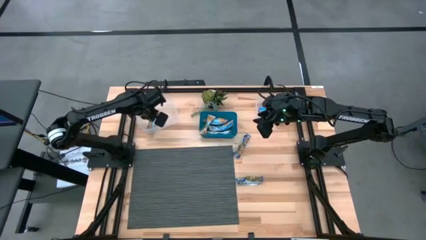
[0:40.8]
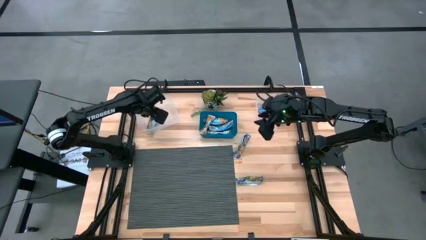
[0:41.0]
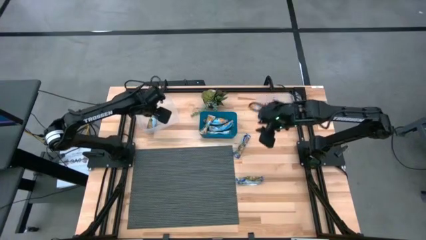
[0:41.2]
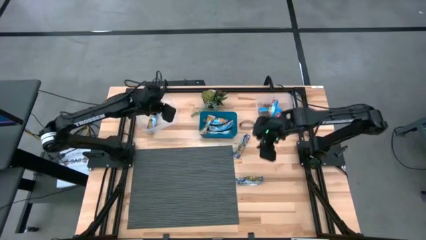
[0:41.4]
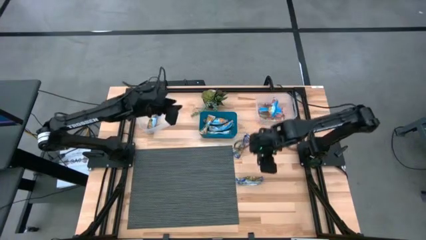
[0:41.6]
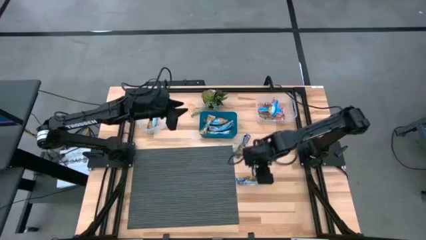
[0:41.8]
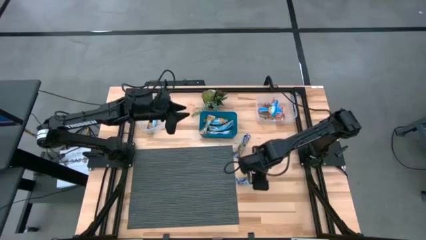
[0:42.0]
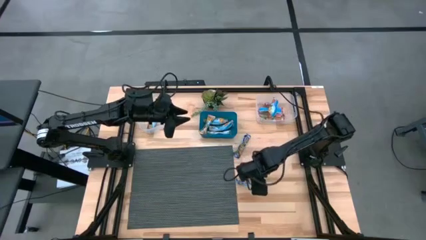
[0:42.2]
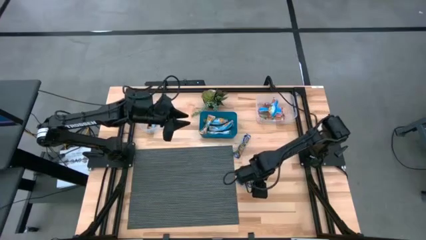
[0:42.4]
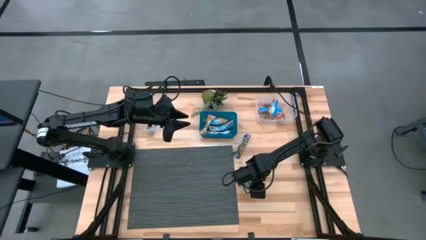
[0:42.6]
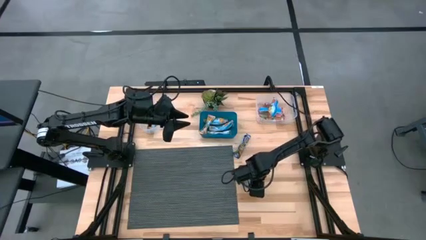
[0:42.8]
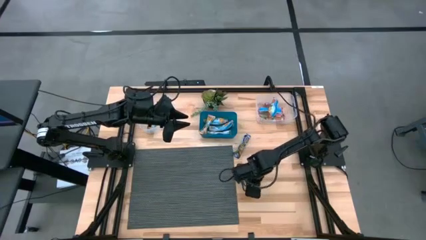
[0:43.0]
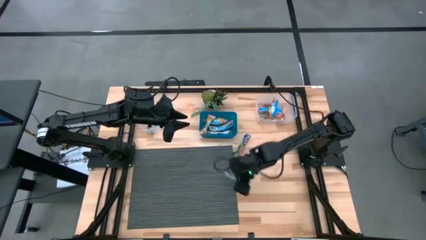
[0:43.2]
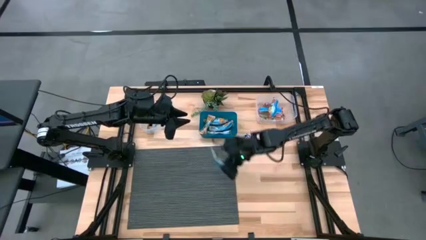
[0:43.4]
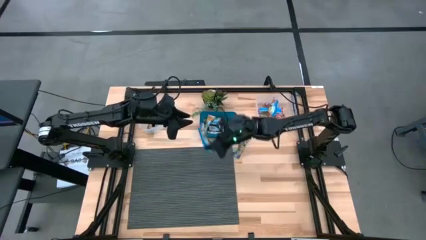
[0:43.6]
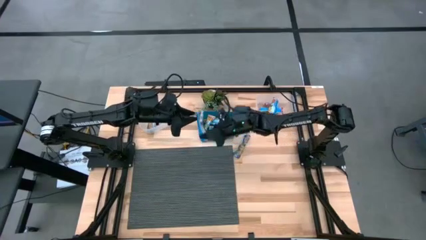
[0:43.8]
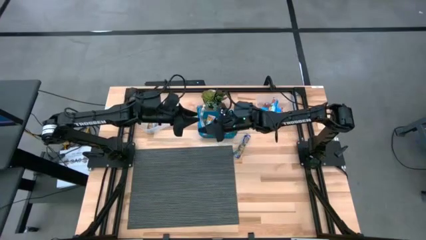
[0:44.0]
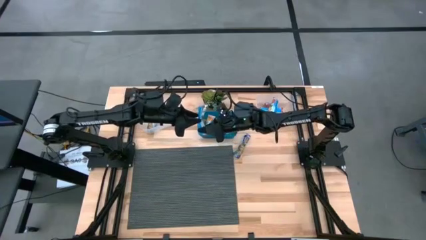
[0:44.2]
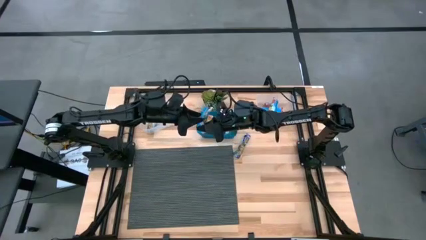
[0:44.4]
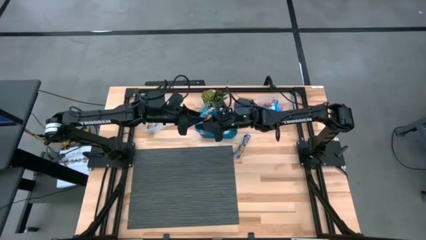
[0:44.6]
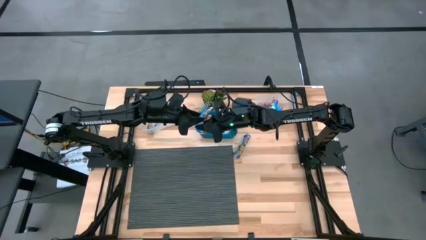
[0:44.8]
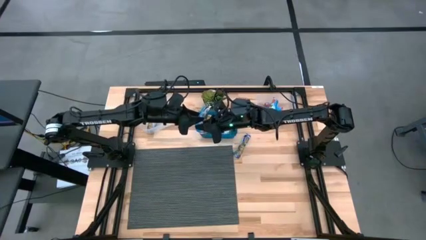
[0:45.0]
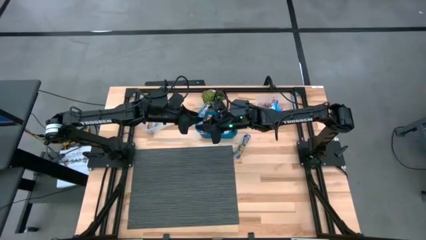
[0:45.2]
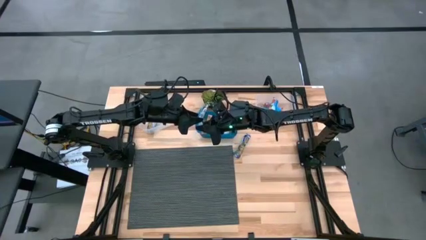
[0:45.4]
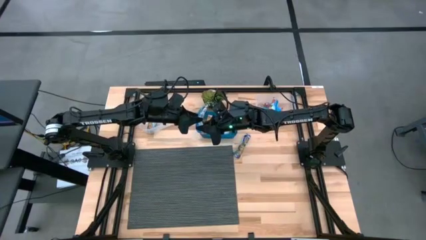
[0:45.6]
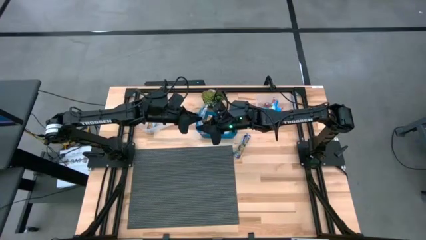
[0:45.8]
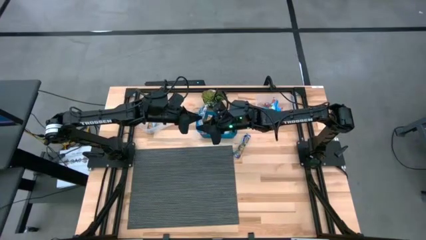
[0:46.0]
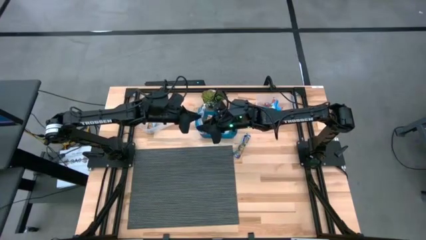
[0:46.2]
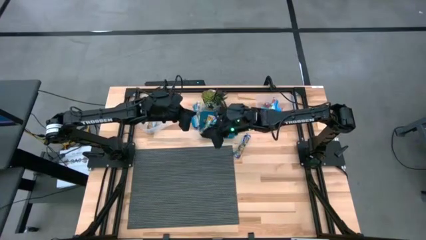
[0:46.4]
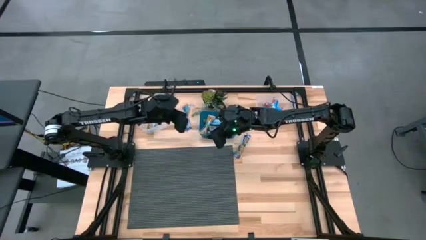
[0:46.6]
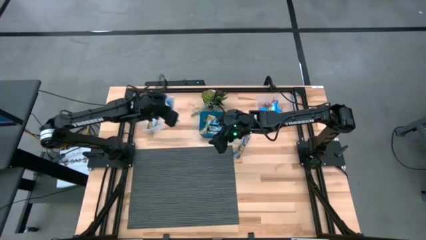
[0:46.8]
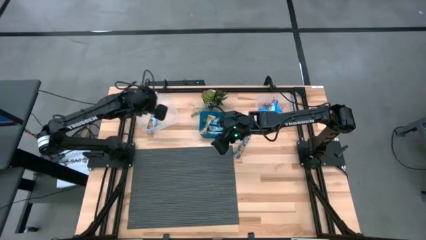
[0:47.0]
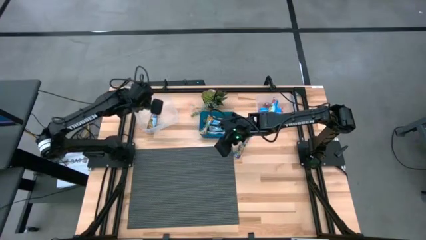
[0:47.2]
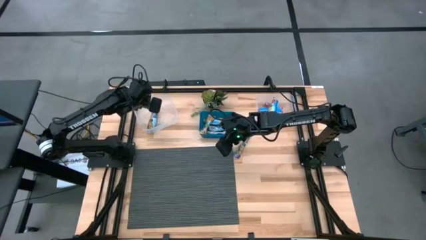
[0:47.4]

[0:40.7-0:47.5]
Task: Pick and place Granola Bars by type
Put the blue granola bar into the left transparent bin

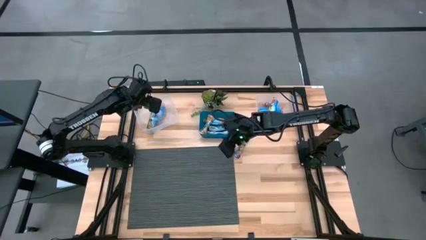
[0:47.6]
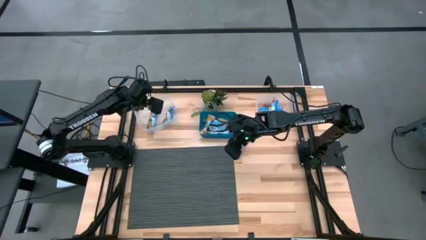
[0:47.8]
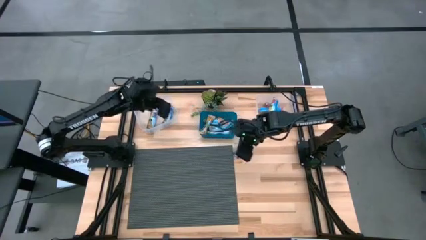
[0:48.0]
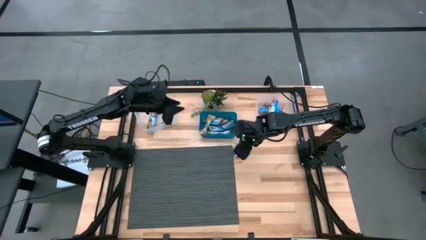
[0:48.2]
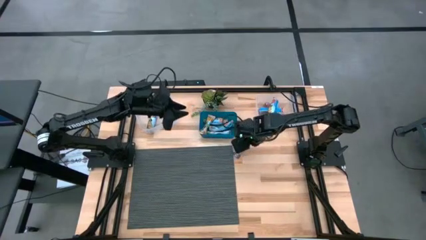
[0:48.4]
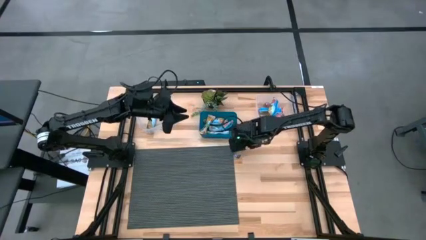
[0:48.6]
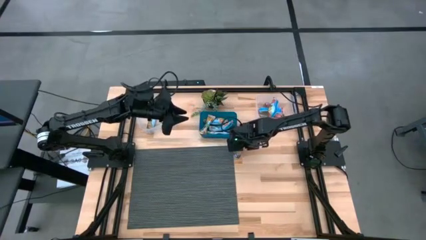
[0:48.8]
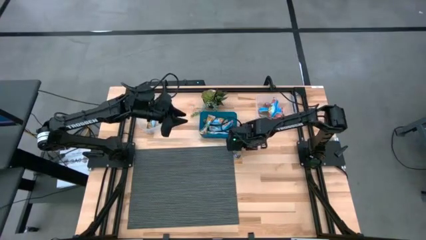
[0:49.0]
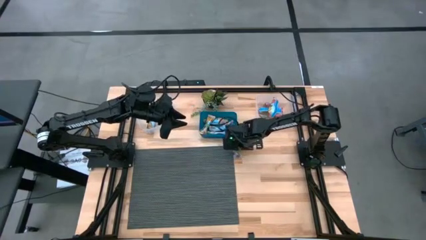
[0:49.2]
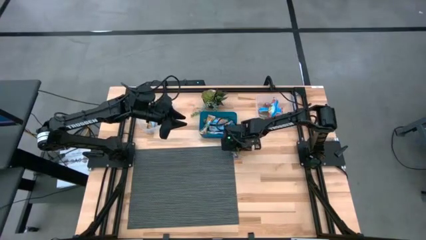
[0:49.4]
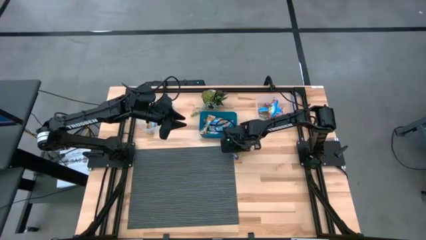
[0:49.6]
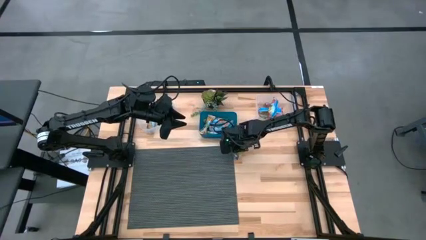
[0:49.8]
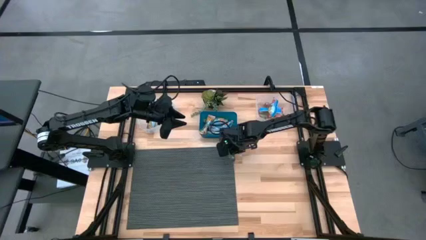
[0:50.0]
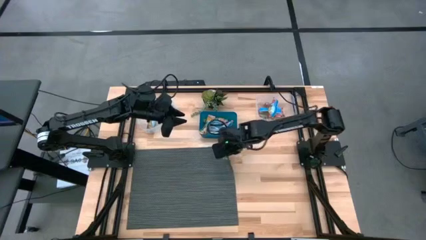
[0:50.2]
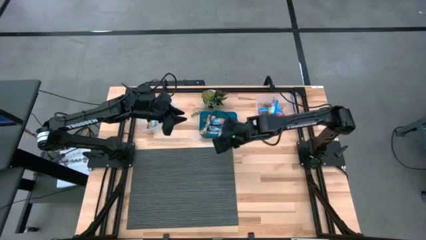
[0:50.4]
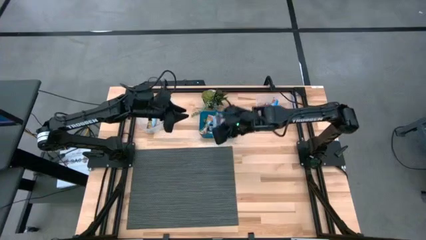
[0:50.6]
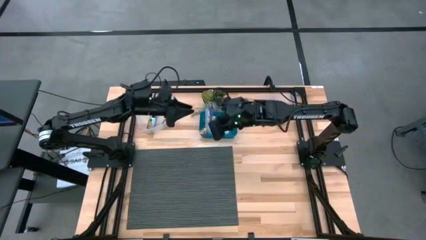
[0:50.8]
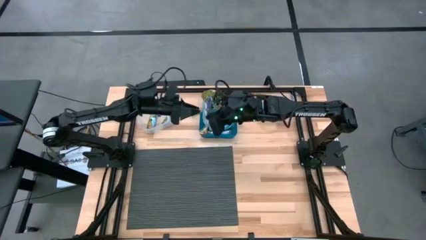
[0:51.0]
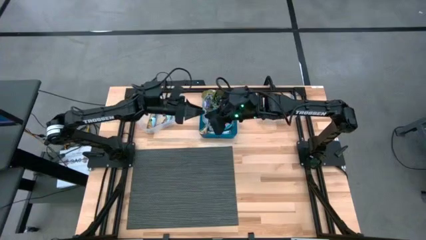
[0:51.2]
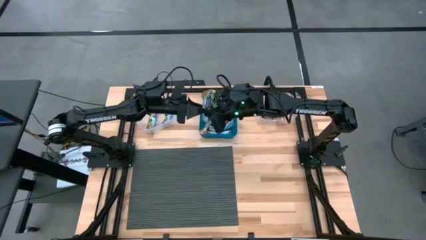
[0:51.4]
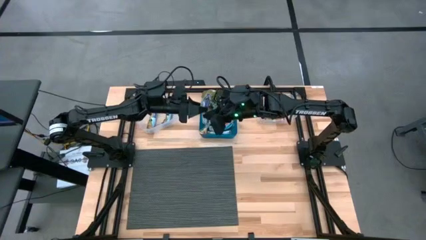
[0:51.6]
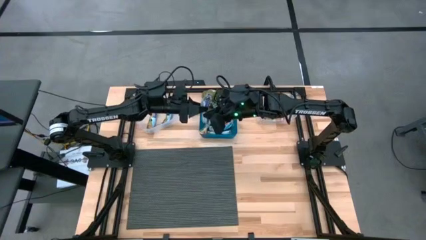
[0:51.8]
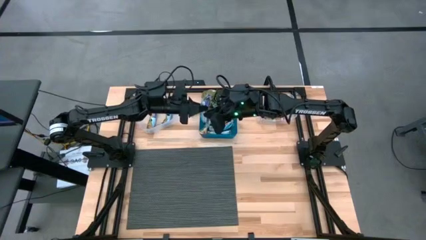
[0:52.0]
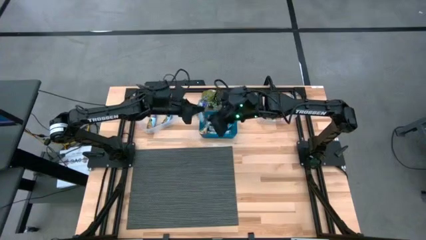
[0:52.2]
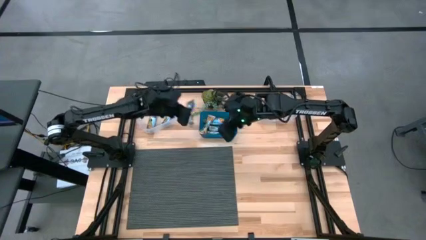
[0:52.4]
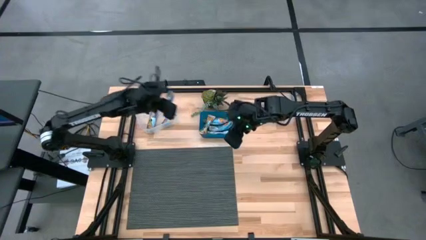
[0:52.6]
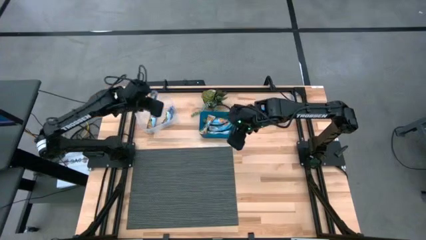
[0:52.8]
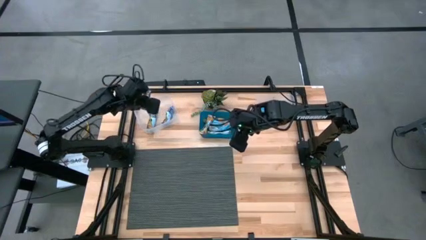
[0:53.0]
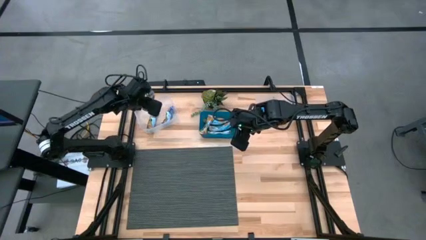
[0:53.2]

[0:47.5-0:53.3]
Put the blue granola bar into the left transparent bin

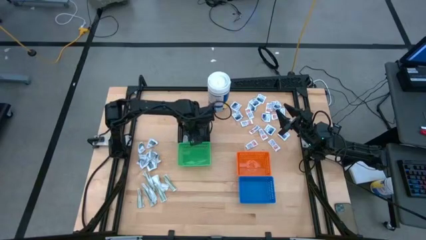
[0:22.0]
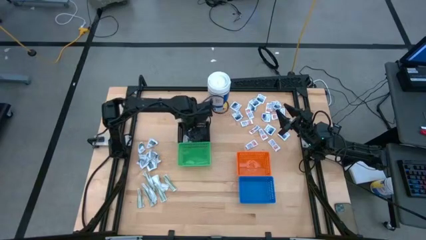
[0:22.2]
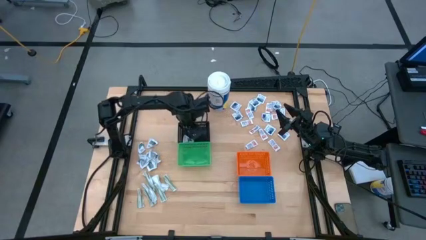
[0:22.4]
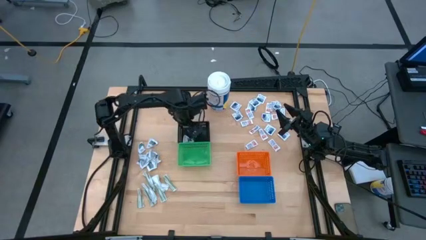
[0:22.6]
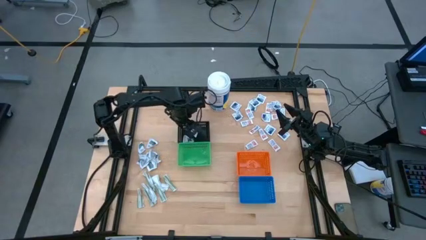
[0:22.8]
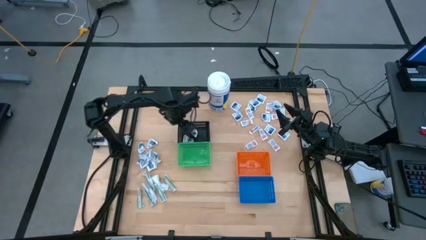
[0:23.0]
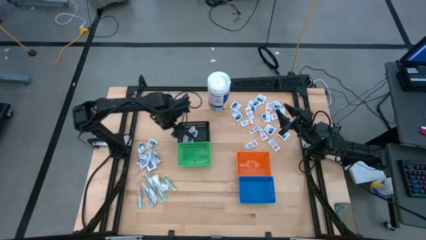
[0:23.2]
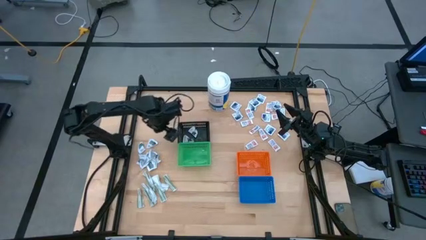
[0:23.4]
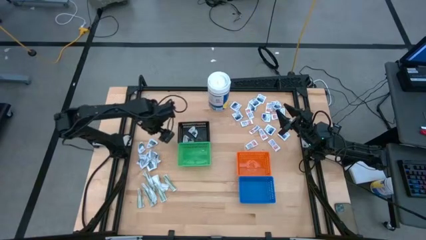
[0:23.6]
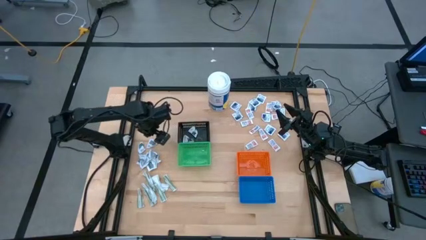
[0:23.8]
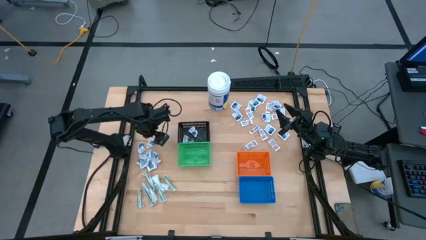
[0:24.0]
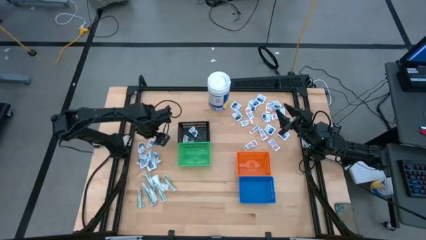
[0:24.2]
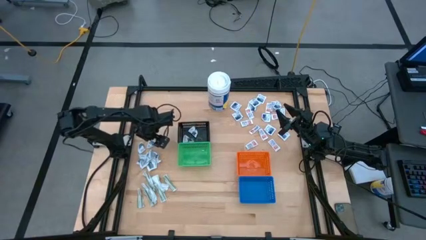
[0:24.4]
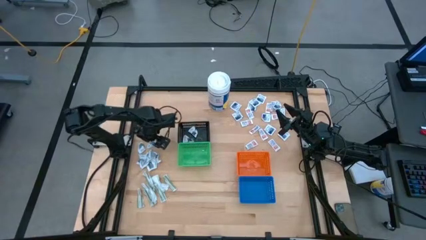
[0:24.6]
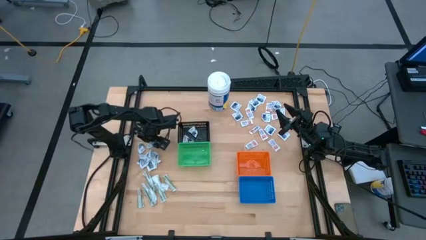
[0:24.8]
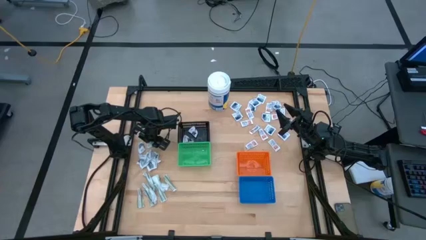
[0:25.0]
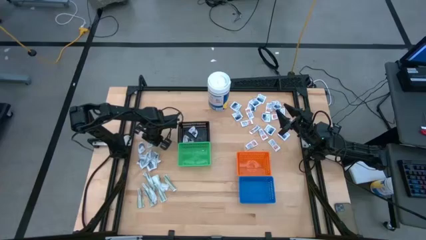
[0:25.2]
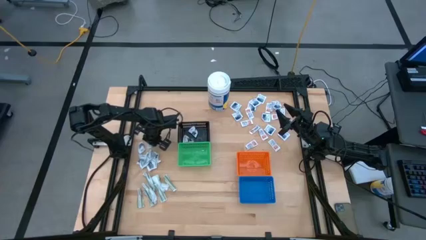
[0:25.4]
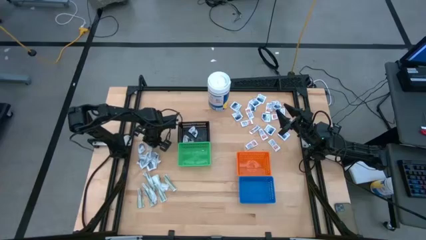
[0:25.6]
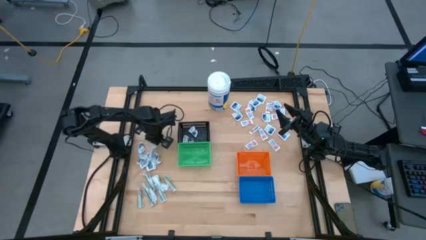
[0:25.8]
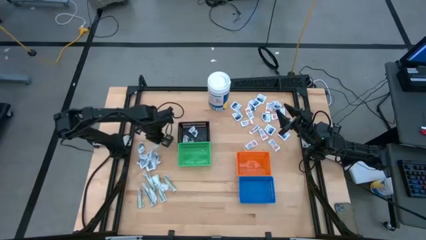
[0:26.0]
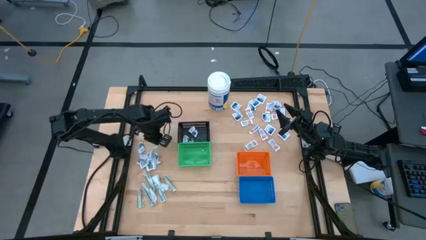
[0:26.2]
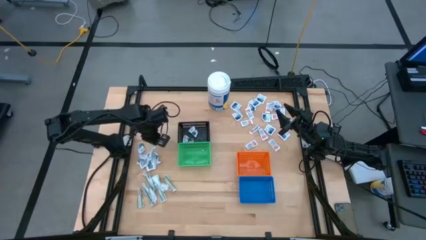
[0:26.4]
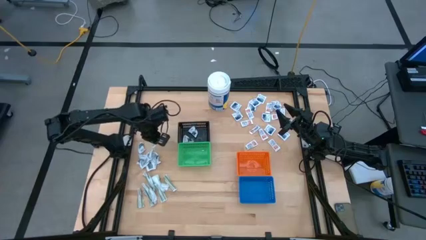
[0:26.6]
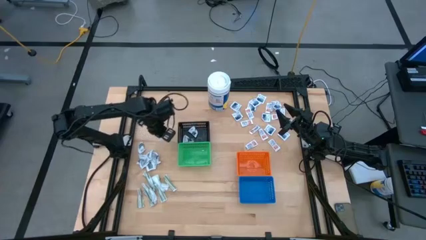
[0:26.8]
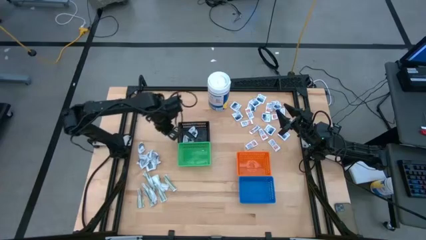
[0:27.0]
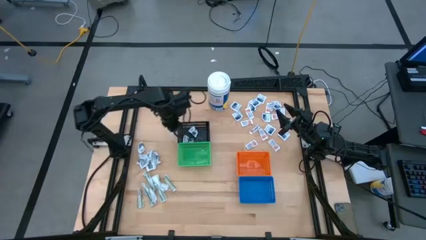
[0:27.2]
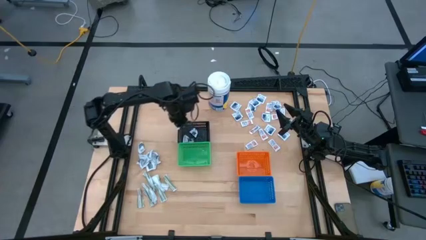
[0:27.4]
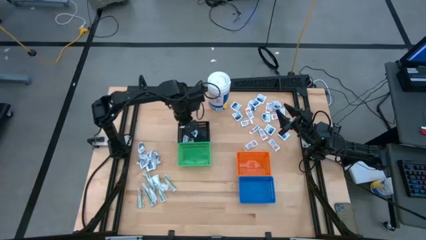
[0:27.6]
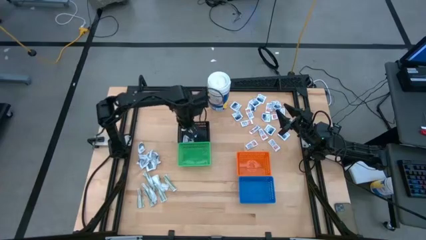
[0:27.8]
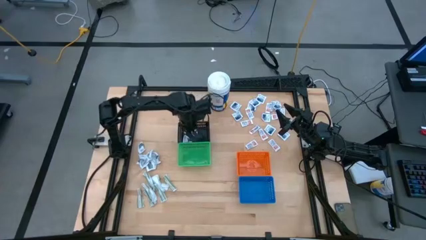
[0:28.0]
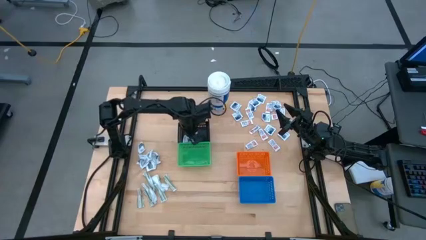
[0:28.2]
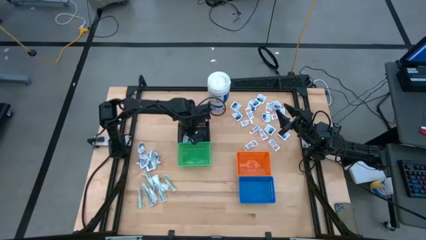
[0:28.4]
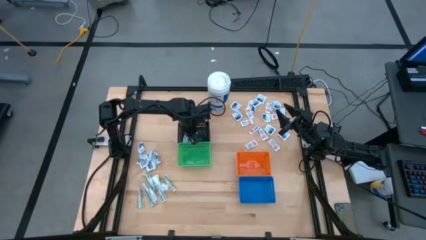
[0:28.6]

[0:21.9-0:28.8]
Task: Pick & Place First Aid Supplies
Put the black pad into the black bin
